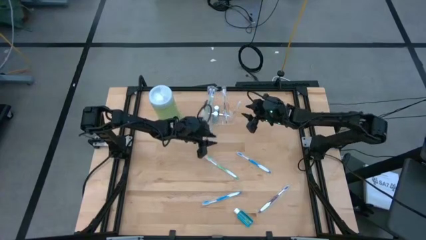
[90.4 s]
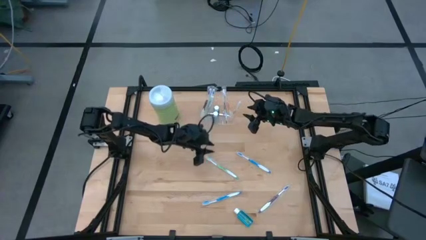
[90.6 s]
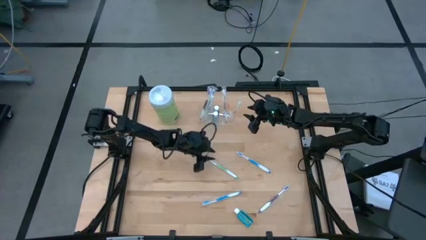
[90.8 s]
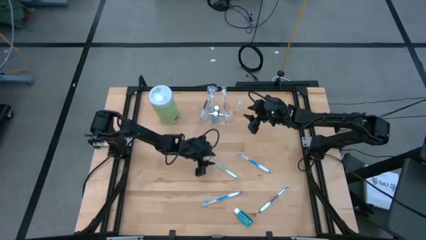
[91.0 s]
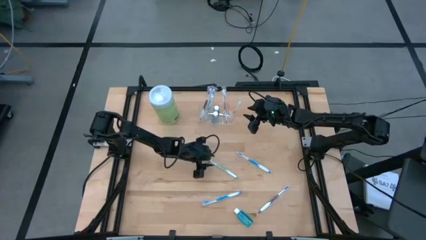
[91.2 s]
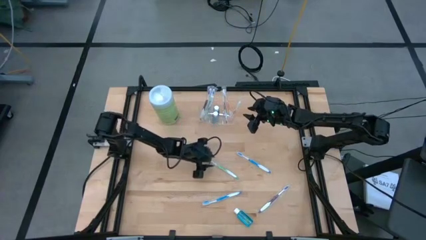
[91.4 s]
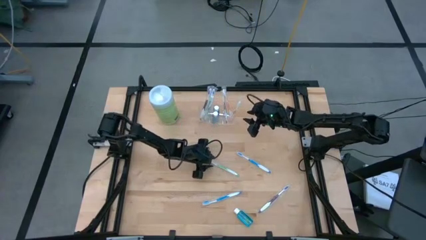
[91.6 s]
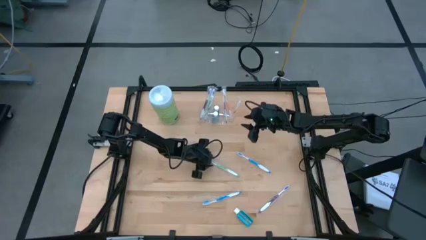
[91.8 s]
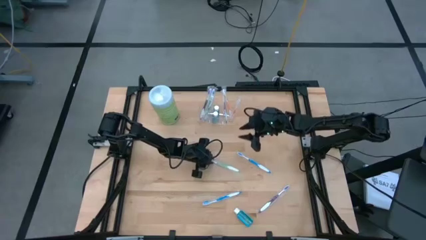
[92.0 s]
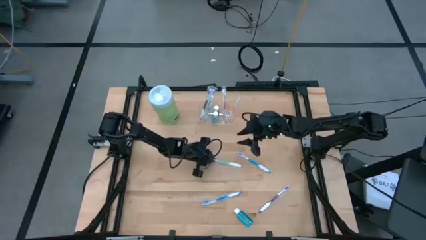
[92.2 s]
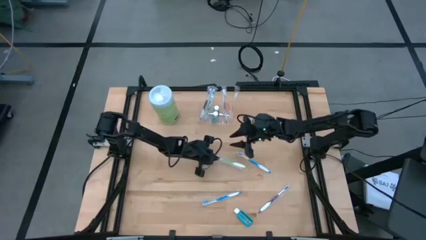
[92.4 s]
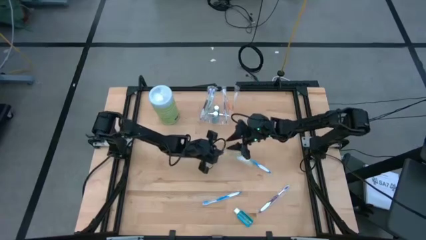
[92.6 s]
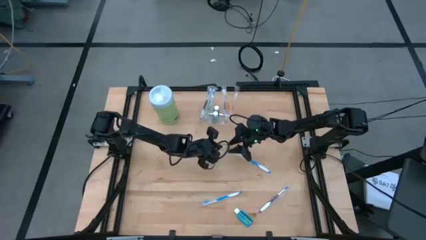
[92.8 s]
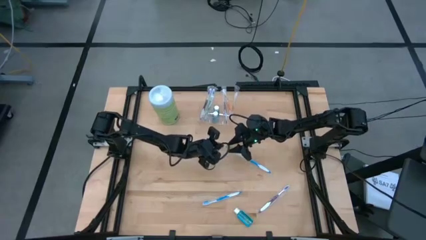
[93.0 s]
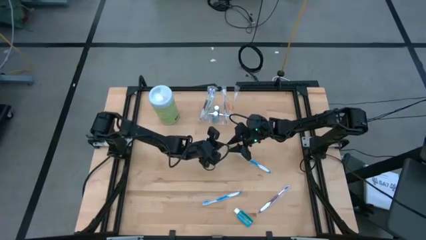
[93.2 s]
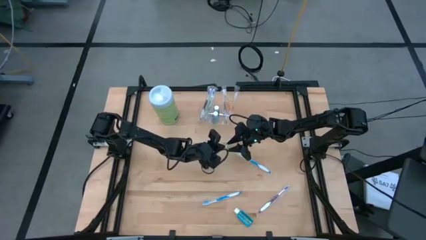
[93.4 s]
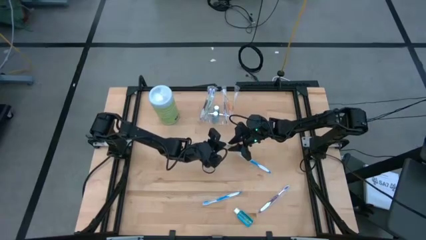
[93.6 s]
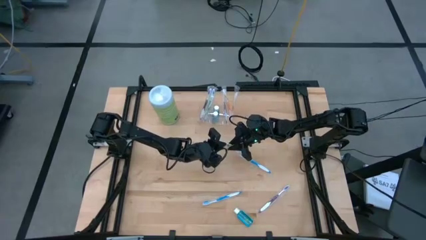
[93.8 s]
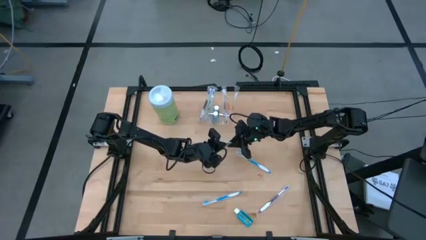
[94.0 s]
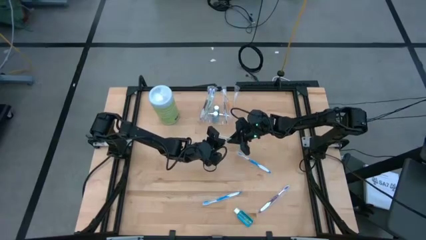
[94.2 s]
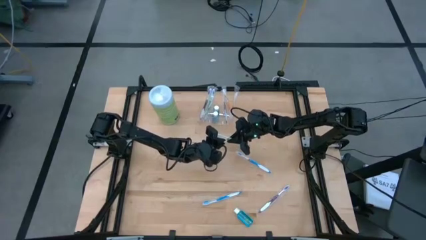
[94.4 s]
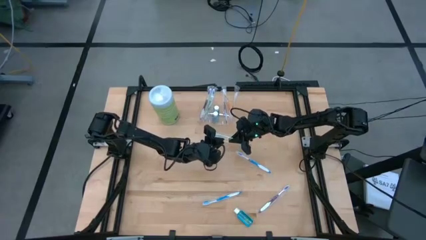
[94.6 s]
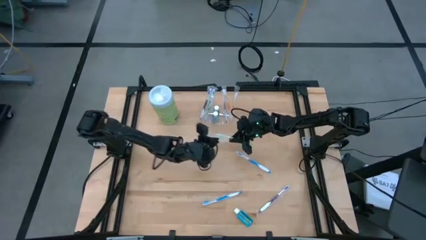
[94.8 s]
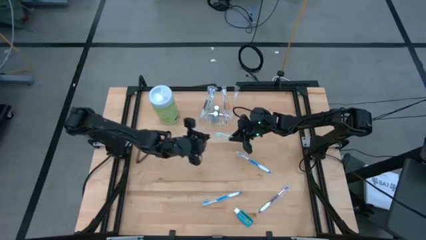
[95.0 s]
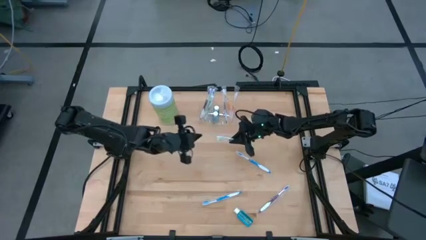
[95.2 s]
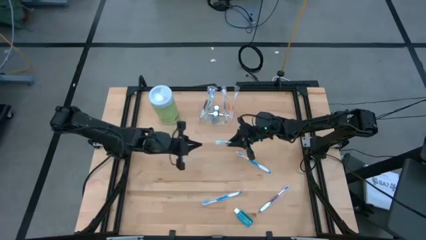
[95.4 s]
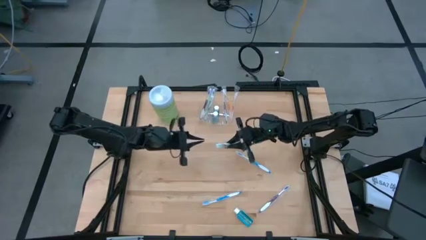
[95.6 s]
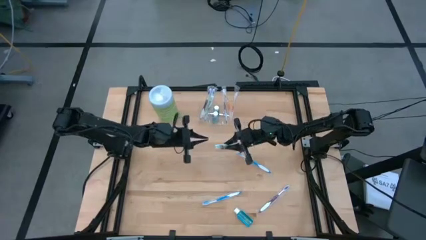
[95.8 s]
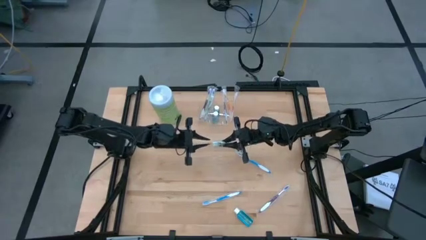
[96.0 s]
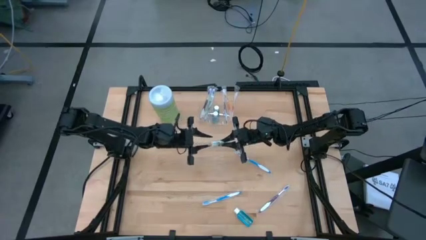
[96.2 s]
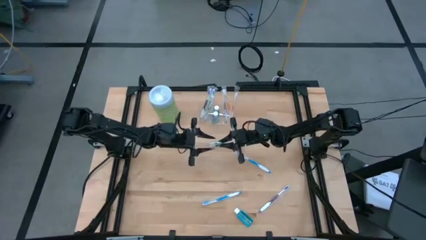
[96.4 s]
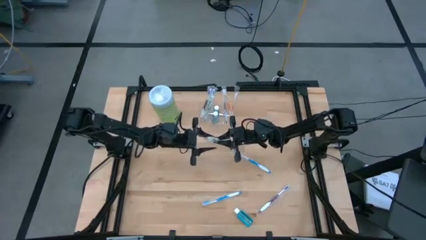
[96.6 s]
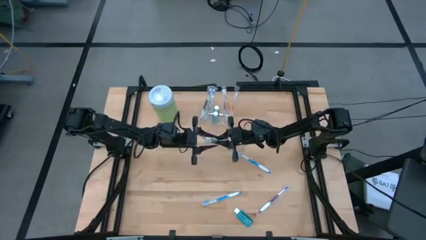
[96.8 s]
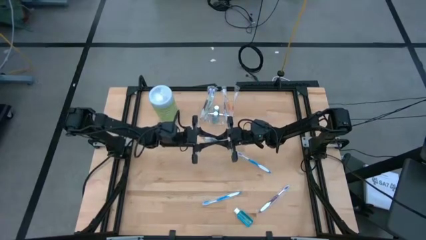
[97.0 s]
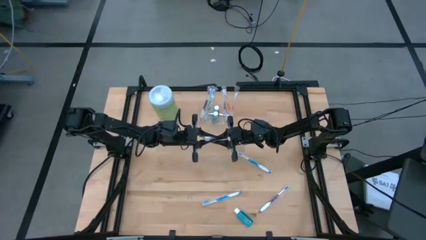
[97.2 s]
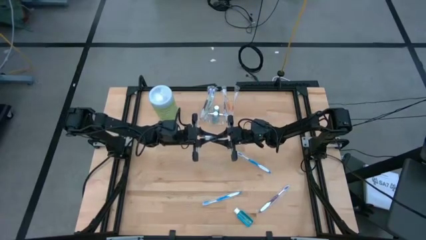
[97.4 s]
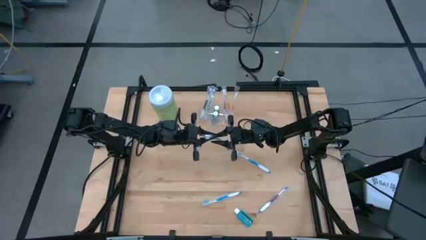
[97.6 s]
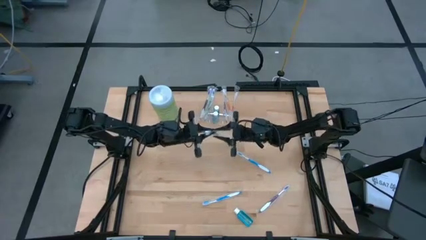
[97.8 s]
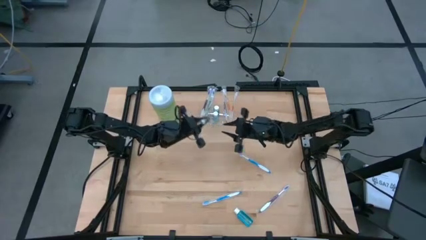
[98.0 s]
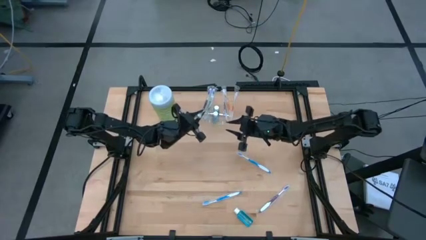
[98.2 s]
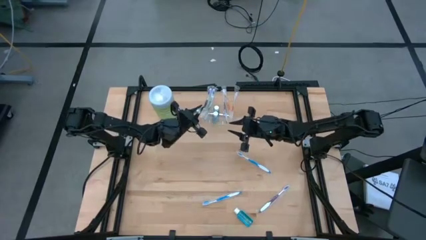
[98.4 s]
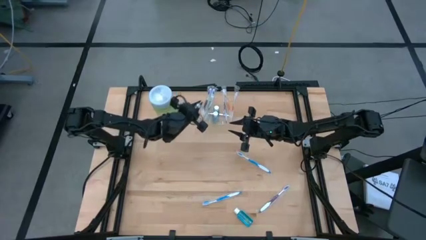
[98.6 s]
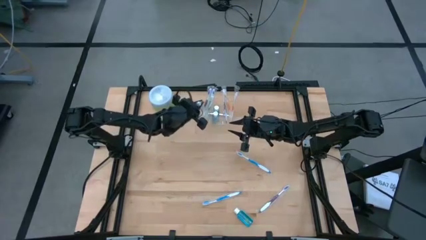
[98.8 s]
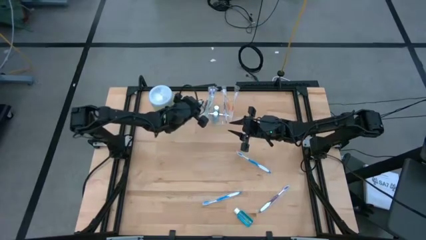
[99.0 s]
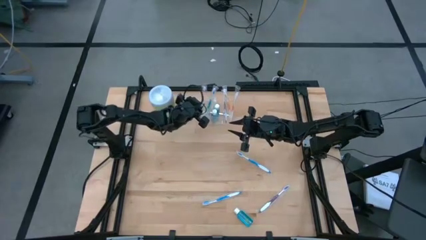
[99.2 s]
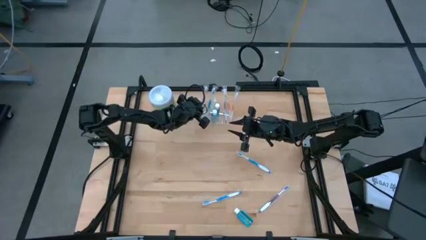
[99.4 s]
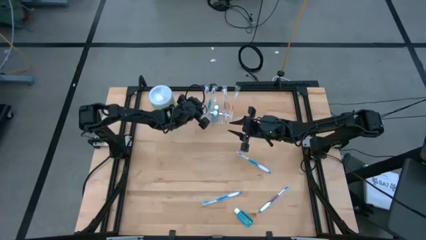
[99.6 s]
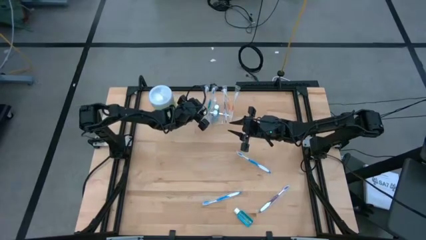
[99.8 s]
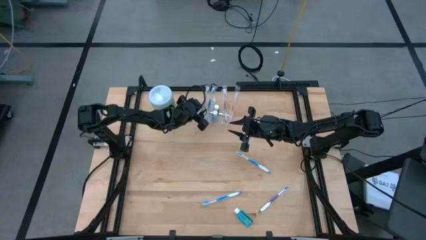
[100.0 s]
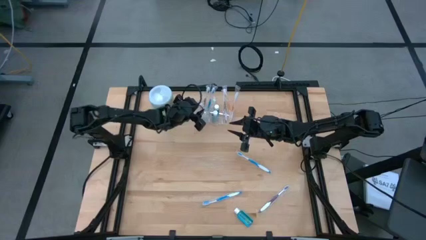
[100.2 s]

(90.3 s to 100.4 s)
Task: Pick & Place toothbrushing station
Put the green toothbrush into the transparent organizer

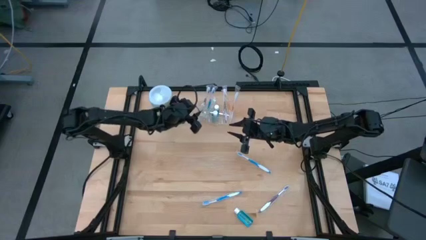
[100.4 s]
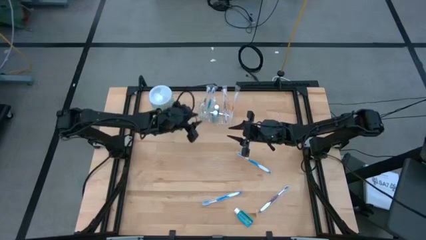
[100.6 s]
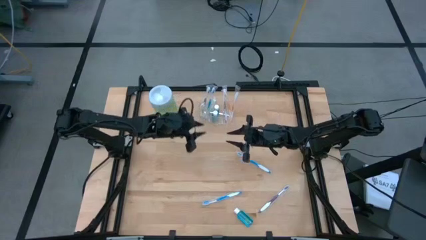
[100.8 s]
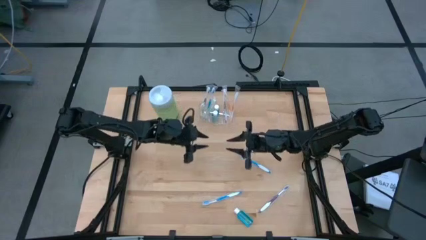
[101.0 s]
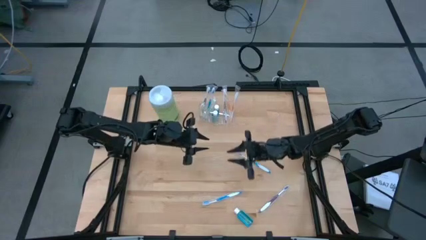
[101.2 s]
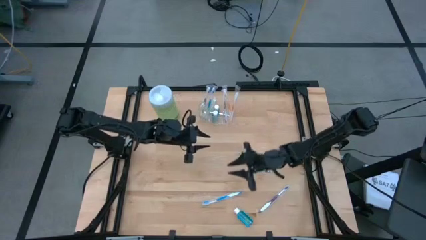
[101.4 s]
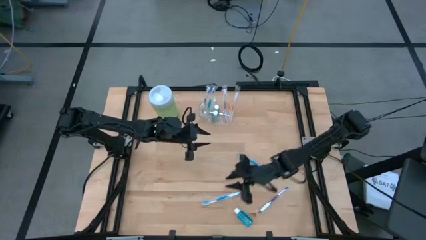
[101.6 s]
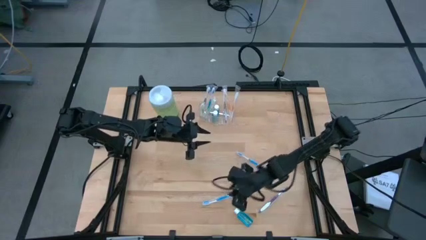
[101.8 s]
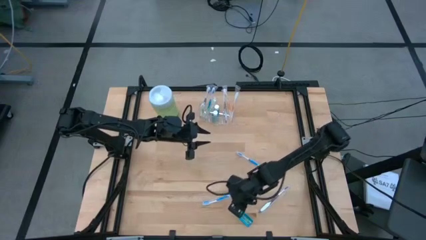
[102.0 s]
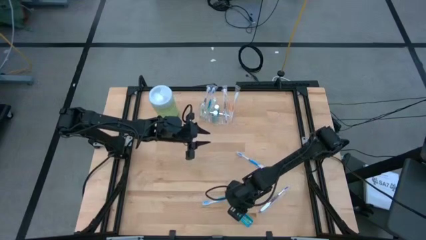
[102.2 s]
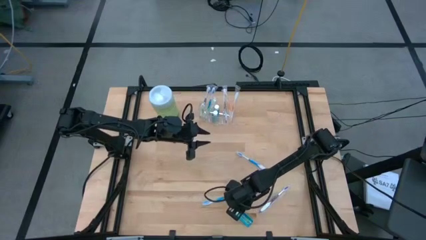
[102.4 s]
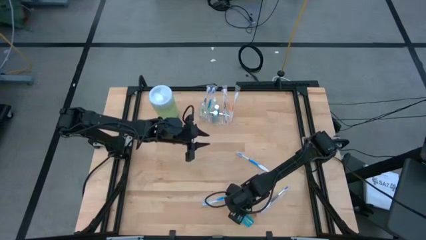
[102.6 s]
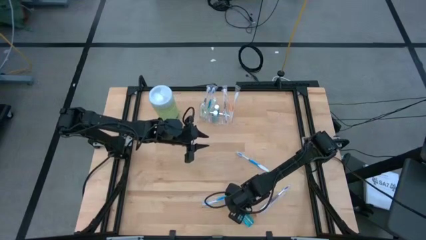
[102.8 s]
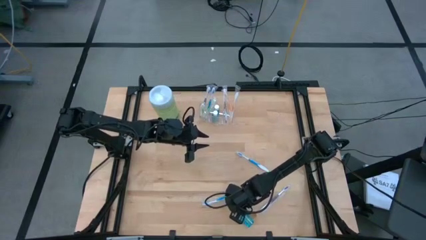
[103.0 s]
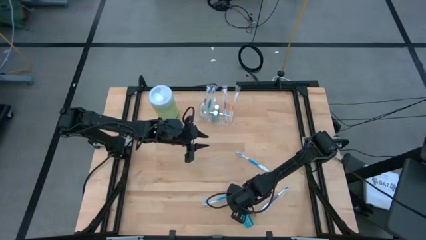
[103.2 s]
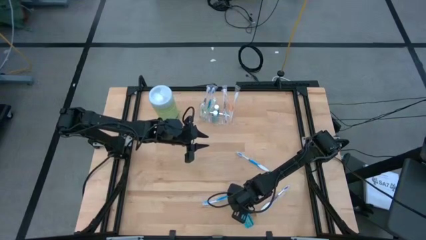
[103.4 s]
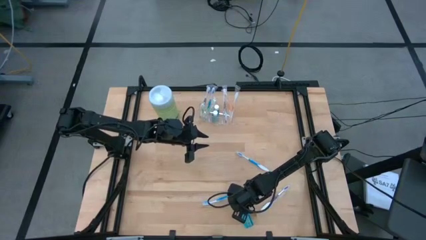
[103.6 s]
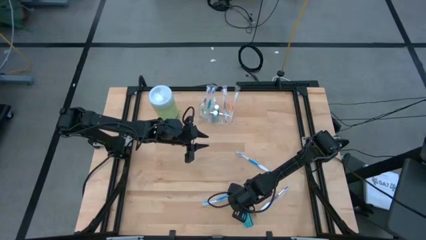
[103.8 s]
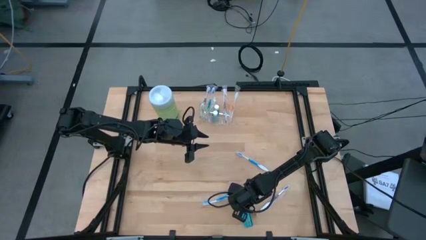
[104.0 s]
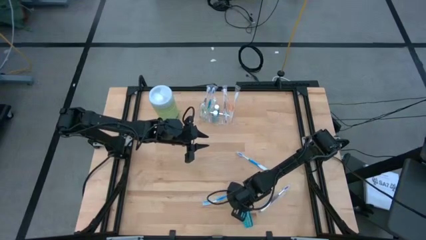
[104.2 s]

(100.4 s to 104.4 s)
Put the mouthwash into the transparent organizer

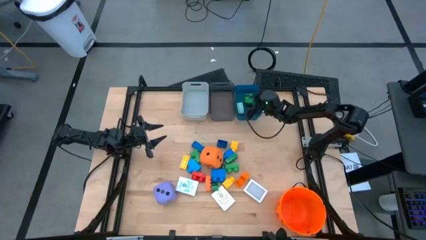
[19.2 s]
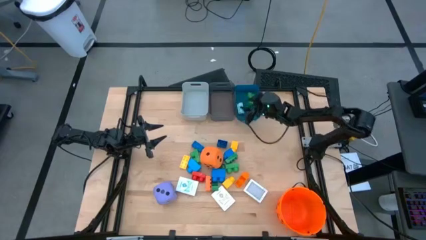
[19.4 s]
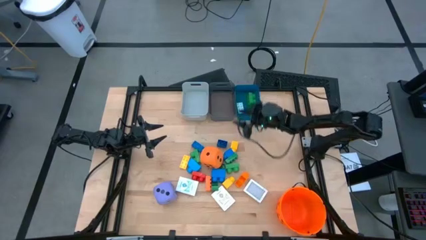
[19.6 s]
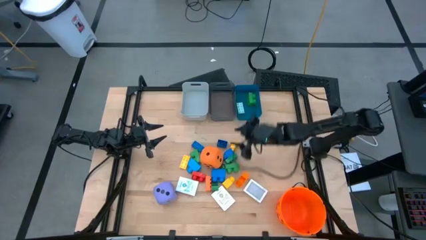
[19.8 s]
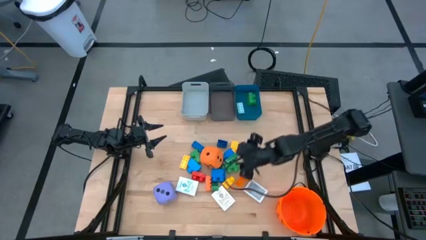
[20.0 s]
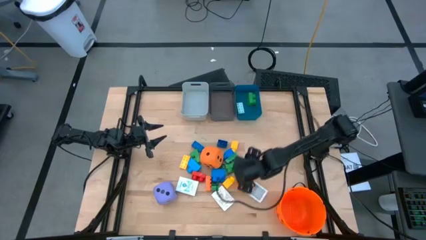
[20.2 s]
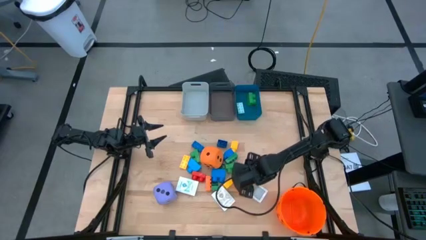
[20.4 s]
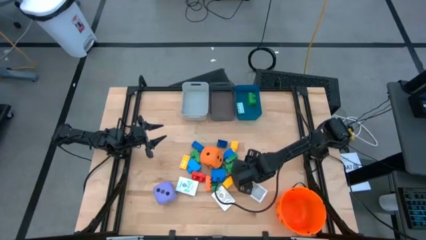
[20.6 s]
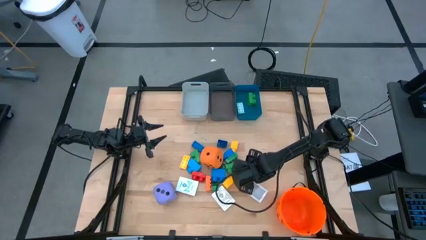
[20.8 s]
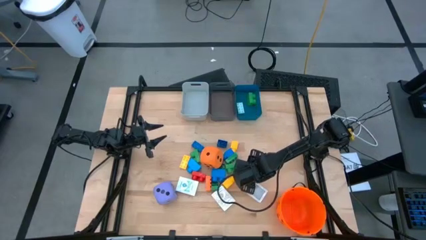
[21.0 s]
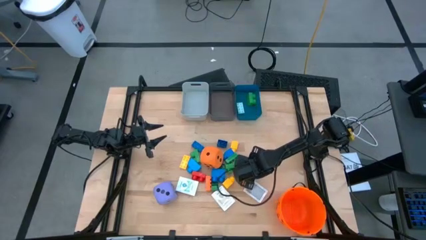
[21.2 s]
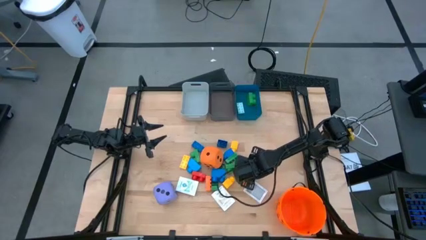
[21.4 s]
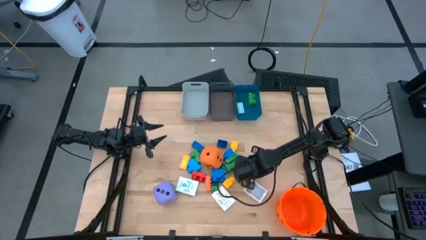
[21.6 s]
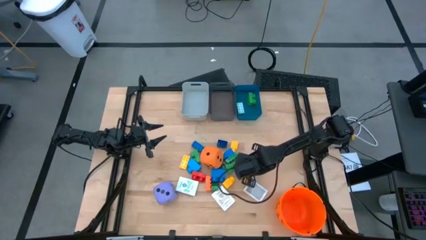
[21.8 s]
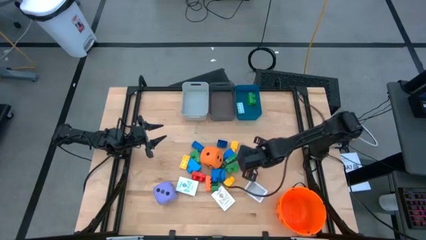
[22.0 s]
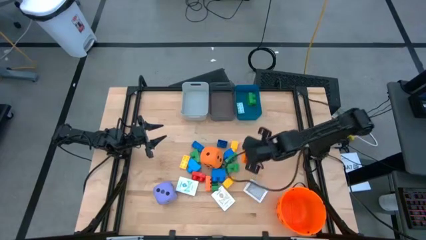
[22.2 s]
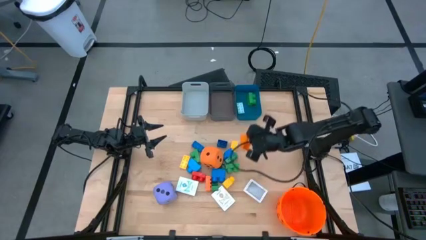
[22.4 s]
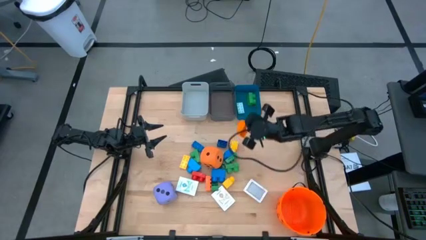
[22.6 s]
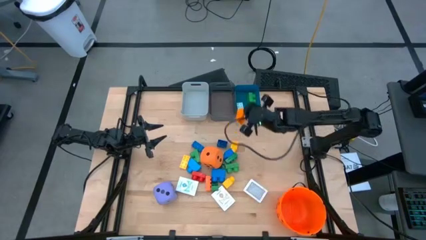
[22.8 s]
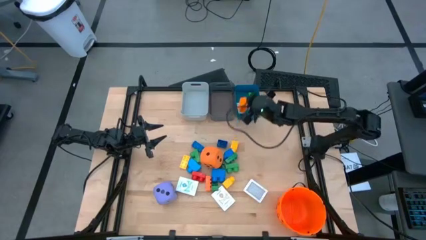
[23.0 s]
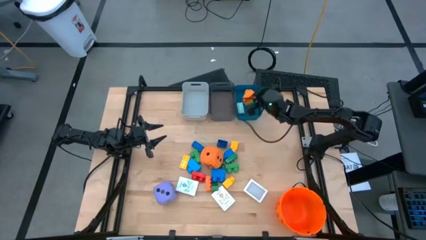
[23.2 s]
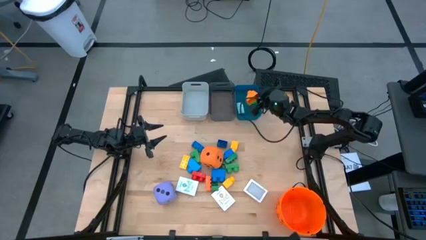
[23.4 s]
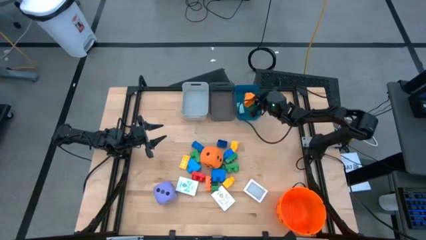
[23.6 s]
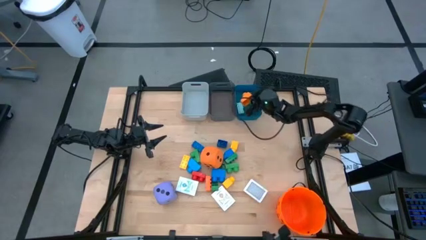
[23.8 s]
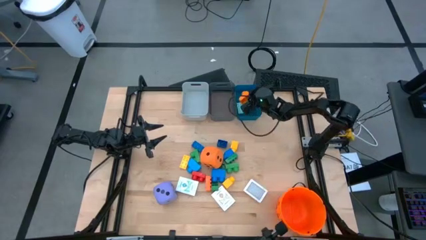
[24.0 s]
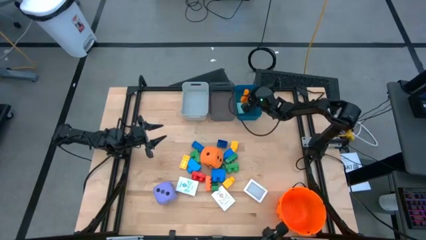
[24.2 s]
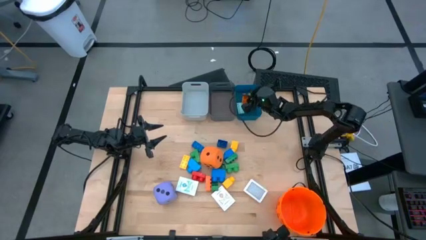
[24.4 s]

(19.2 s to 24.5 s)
Task: Pick & Place Toys
Put the orange game piece into the blue bin
